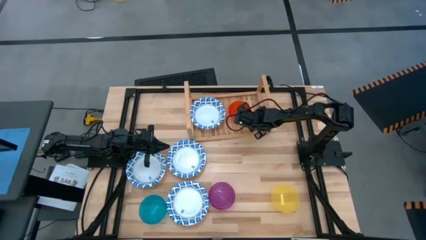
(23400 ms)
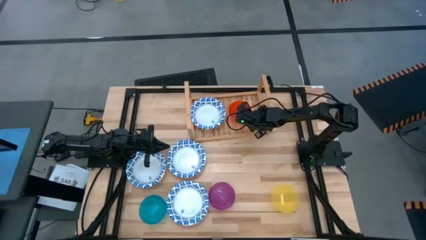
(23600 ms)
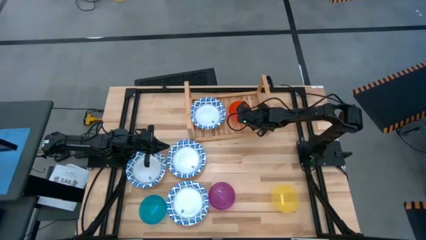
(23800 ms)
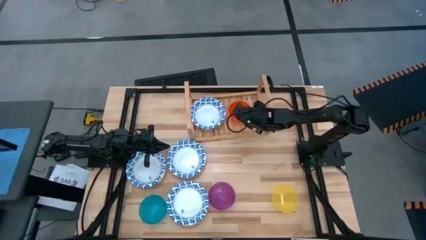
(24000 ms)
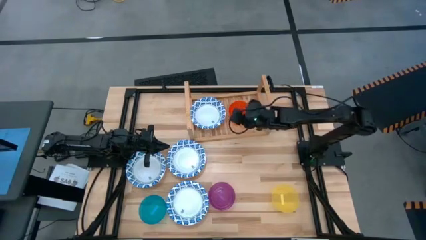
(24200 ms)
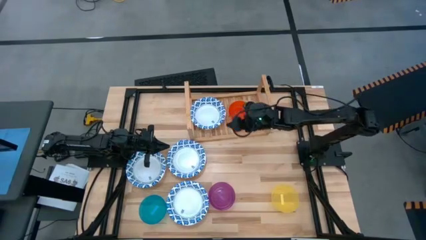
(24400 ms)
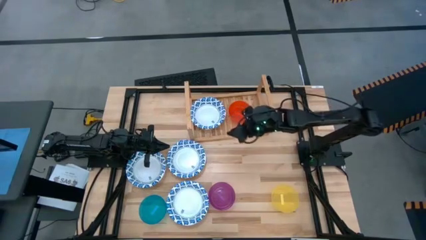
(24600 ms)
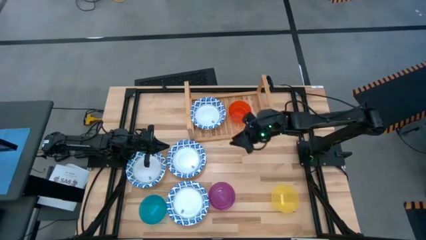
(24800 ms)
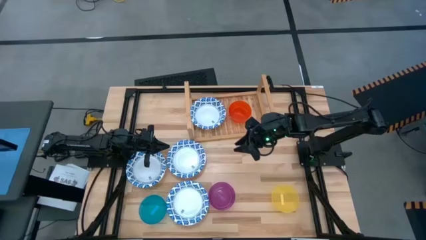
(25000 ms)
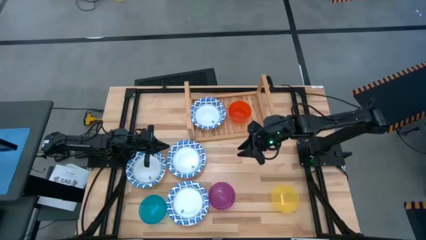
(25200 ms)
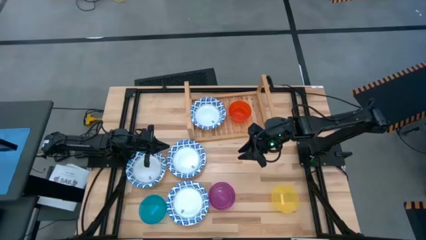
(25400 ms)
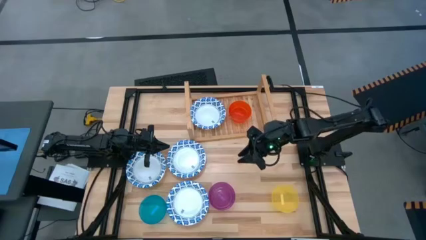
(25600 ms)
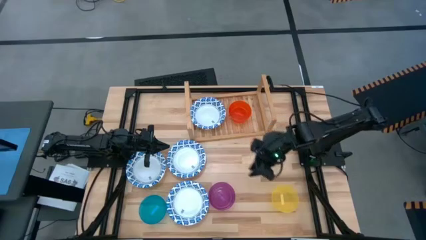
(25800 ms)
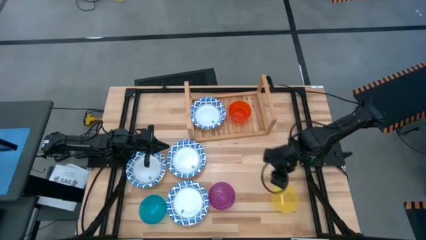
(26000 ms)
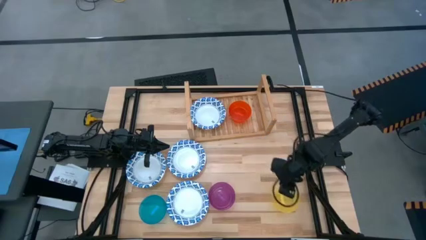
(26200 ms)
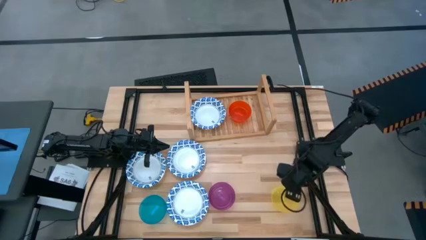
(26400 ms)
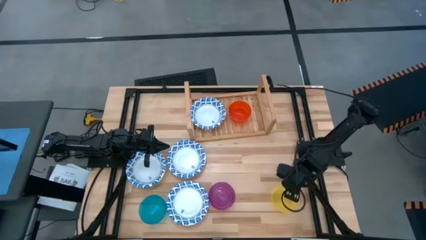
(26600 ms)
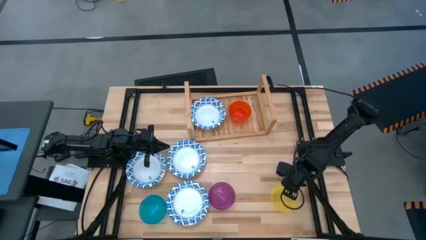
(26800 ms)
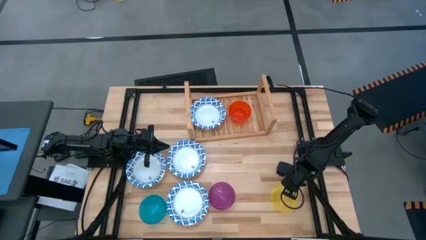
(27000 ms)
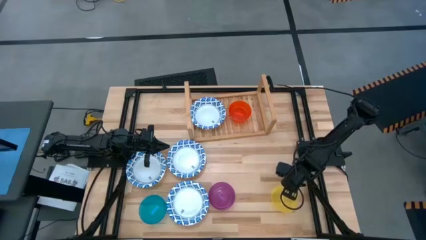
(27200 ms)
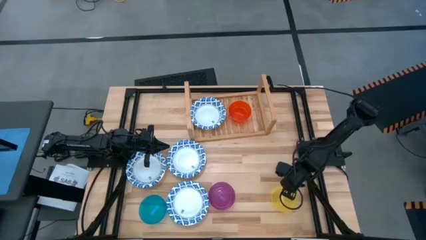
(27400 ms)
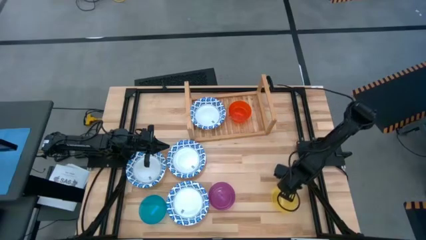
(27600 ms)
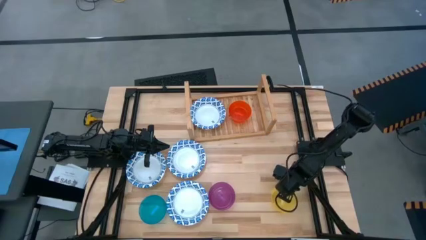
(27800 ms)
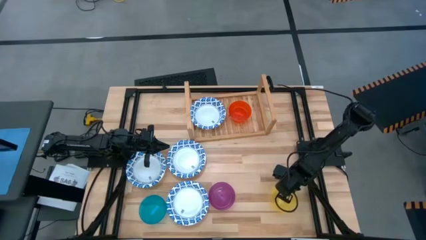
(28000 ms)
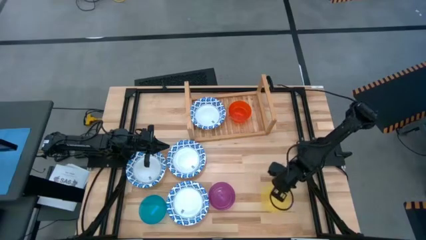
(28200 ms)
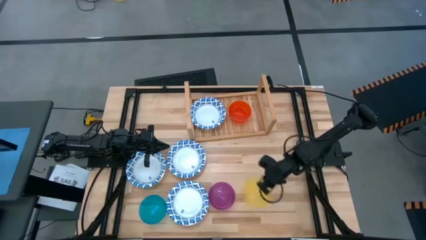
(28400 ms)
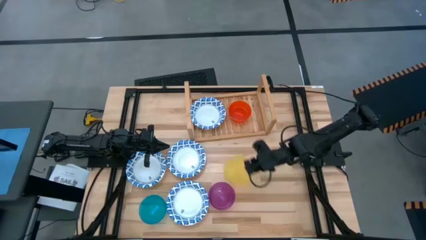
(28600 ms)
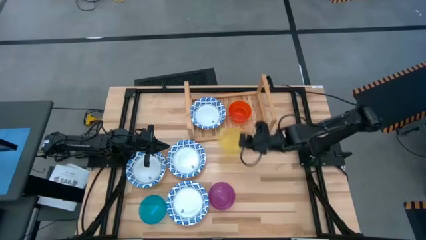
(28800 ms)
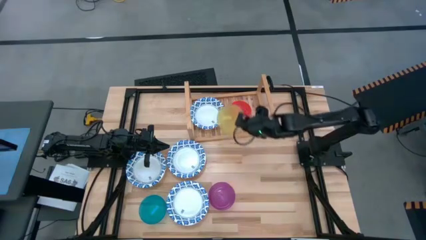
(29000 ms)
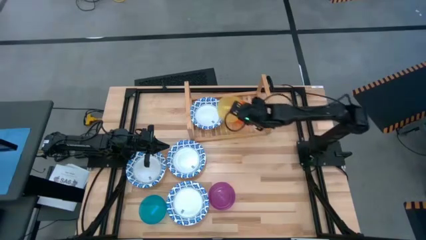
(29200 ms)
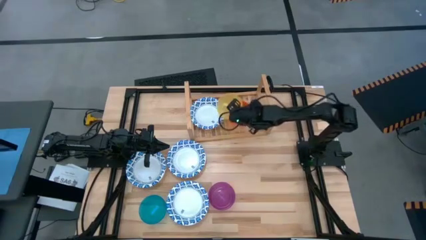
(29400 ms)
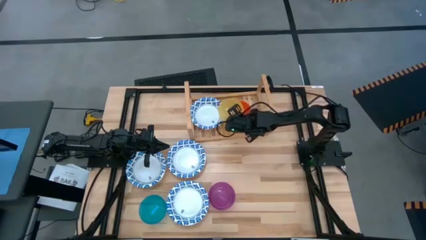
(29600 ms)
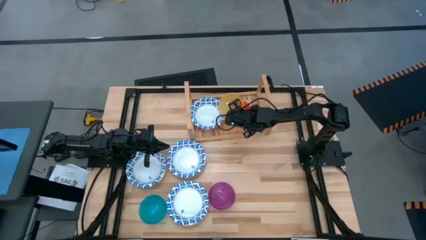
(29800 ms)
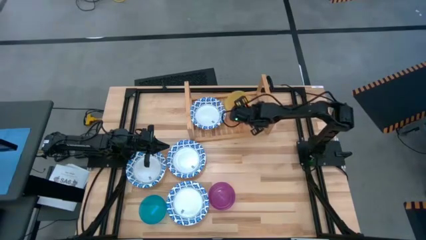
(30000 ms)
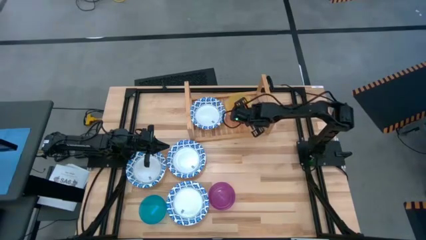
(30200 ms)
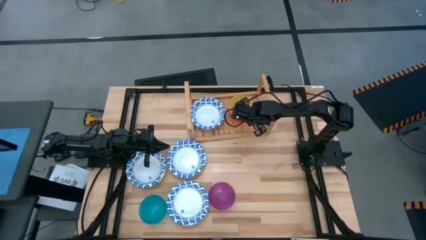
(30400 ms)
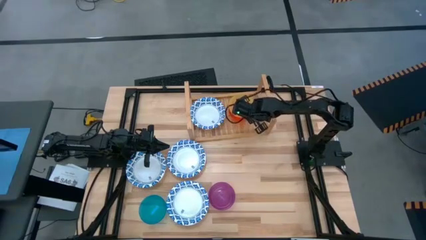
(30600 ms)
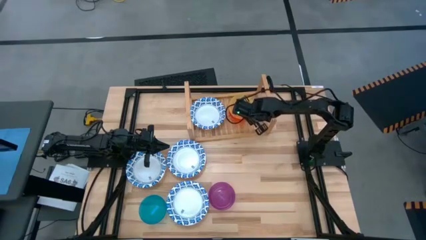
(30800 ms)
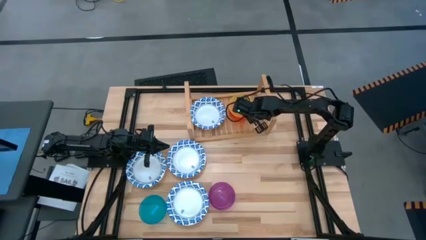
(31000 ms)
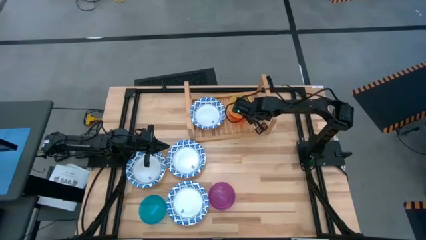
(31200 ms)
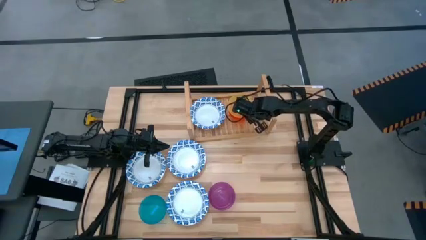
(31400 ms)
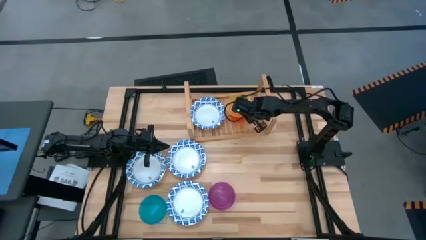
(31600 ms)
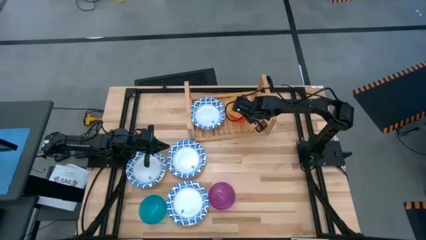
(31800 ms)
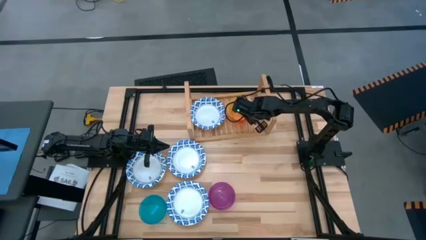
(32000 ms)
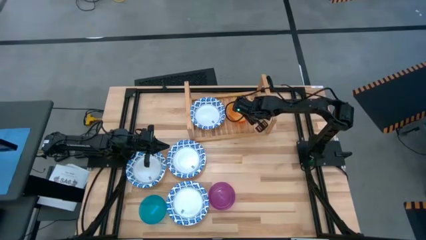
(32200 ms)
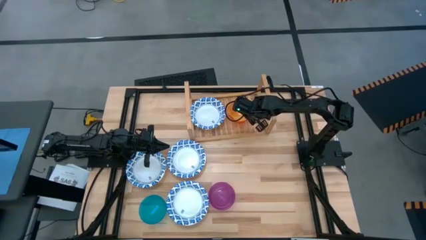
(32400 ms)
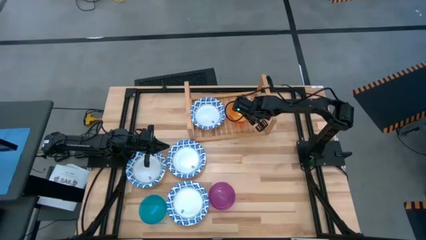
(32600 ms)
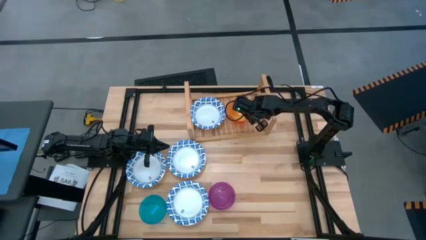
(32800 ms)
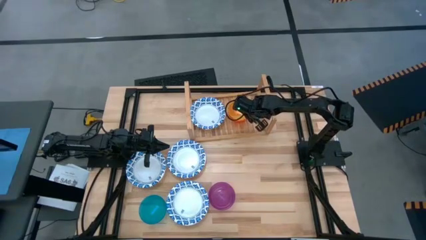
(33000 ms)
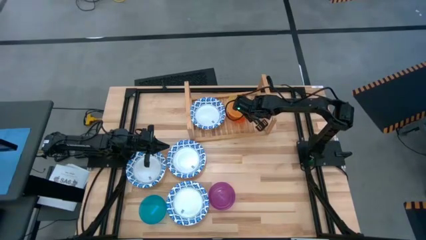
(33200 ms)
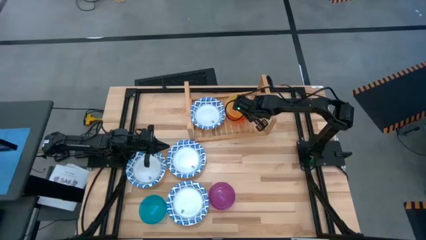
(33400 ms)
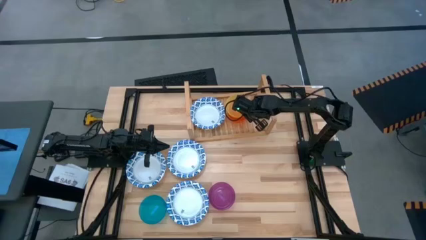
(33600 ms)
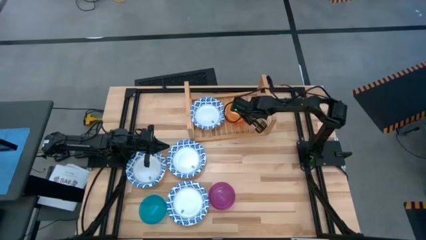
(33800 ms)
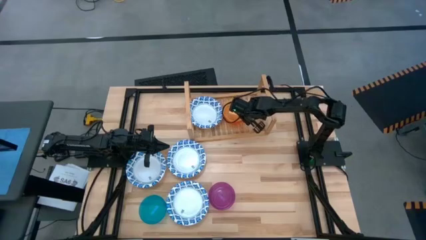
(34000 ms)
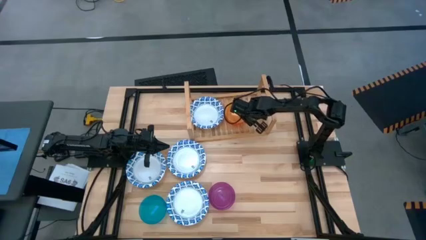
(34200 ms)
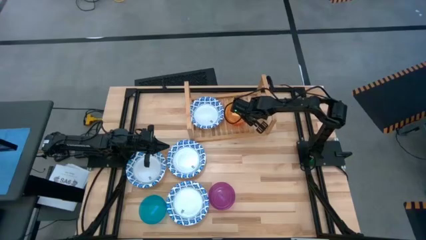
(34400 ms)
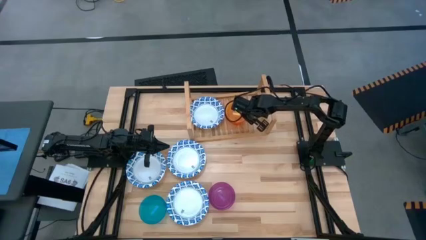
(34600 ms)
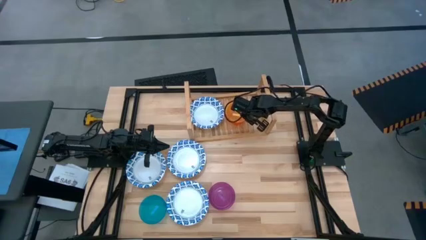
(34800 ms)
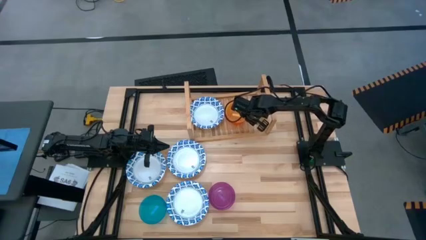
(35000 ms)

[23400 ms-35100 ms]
Task: Place and stack bowls onto a shelf
Stack the yellow transparent bowl on top of the orange transparent bowl on the shelf

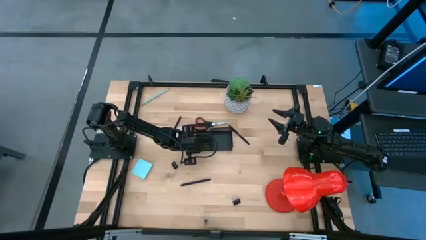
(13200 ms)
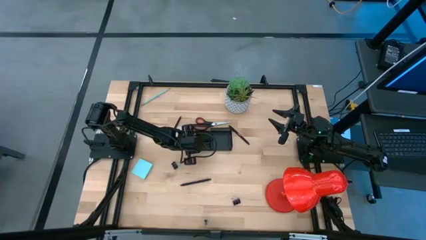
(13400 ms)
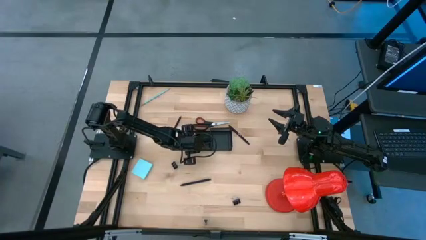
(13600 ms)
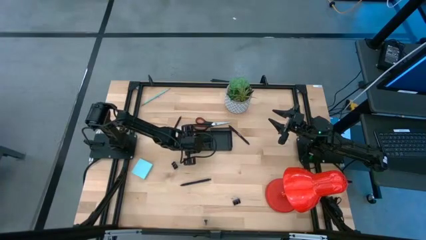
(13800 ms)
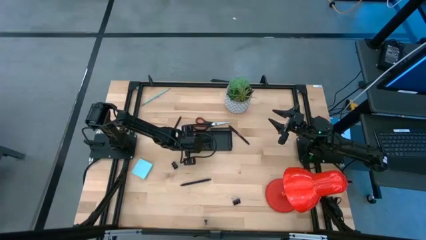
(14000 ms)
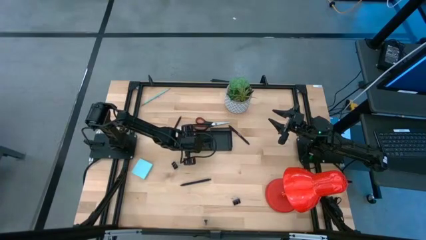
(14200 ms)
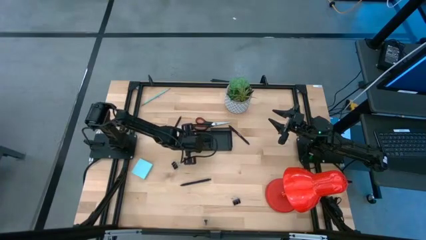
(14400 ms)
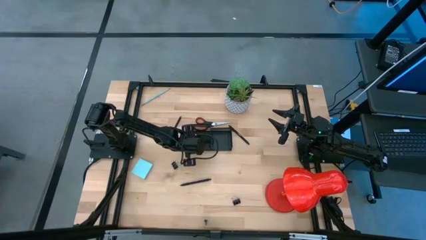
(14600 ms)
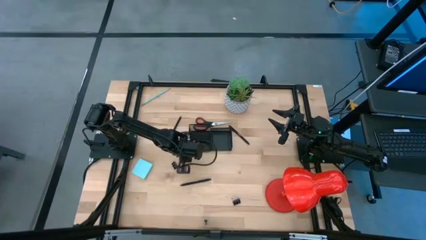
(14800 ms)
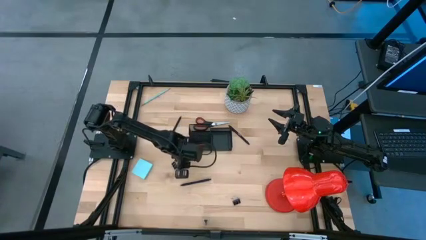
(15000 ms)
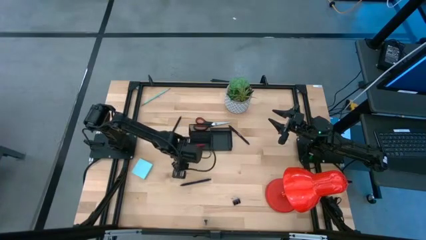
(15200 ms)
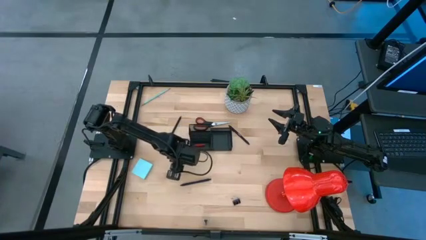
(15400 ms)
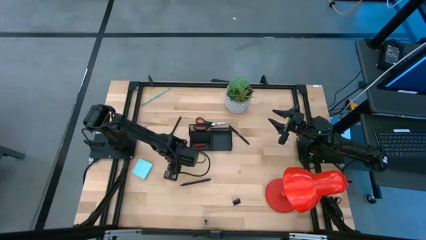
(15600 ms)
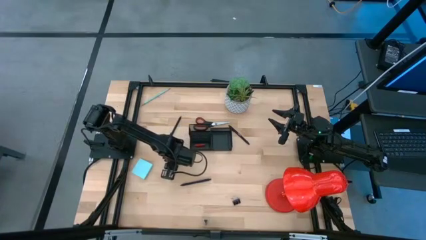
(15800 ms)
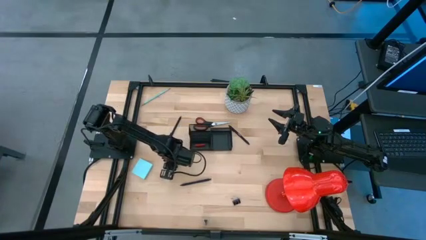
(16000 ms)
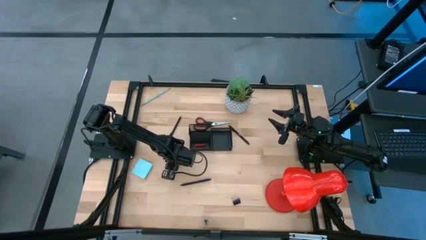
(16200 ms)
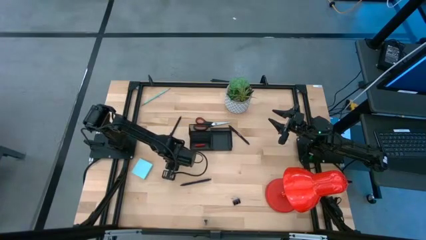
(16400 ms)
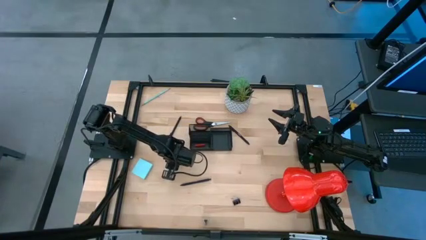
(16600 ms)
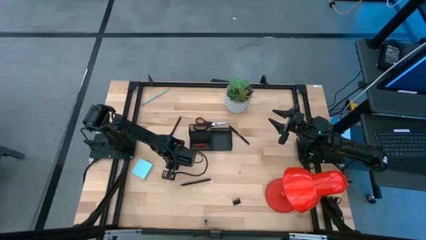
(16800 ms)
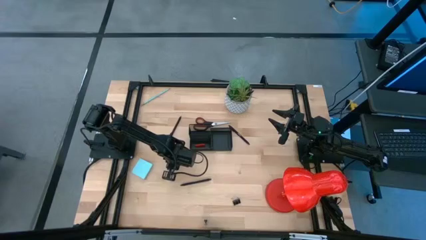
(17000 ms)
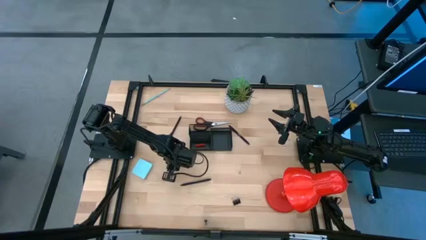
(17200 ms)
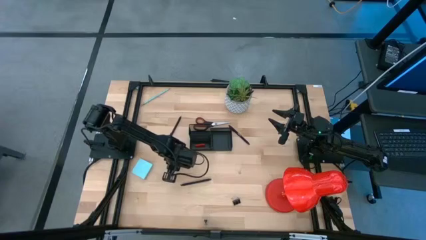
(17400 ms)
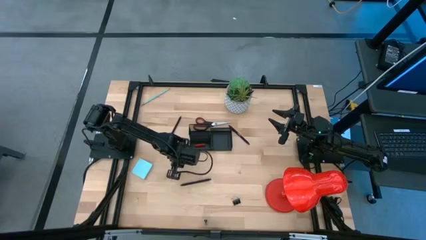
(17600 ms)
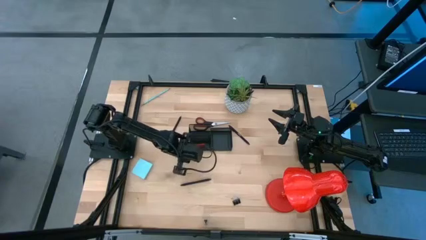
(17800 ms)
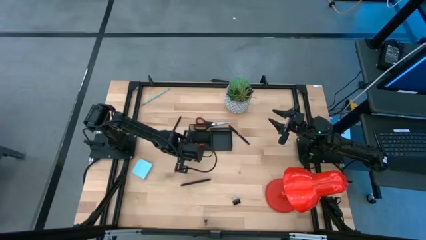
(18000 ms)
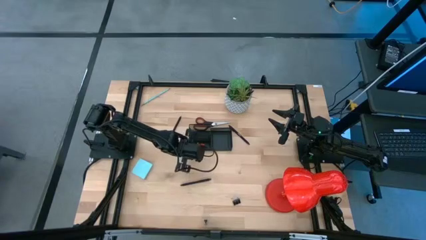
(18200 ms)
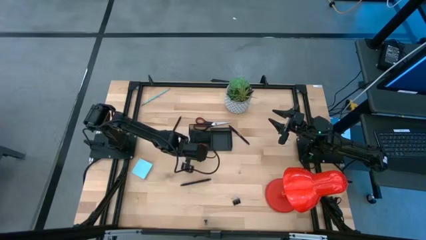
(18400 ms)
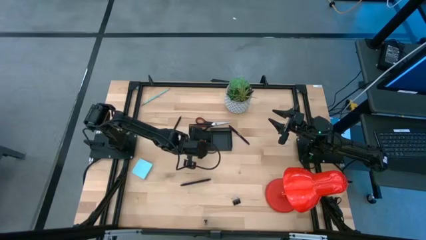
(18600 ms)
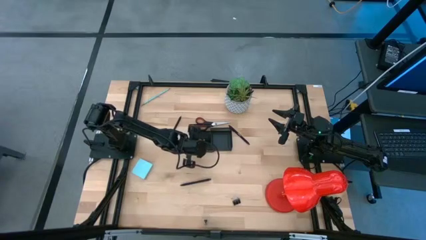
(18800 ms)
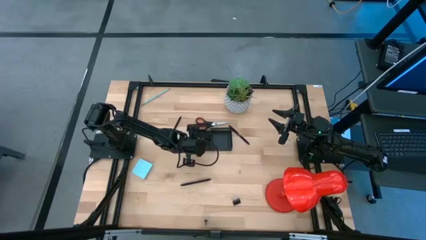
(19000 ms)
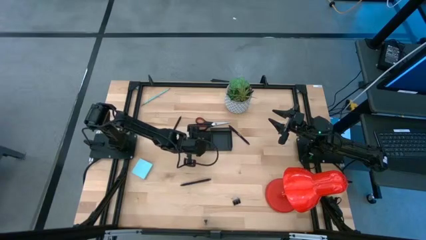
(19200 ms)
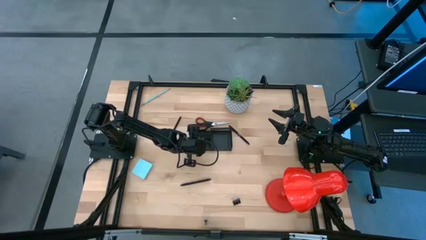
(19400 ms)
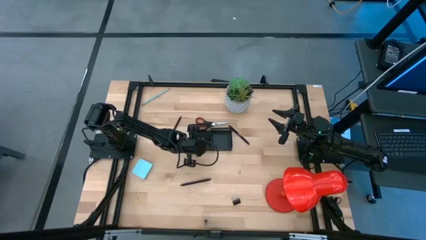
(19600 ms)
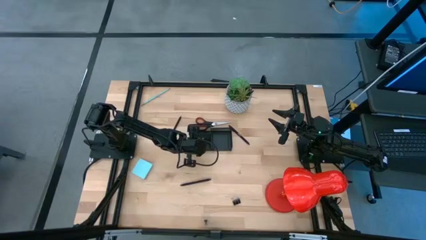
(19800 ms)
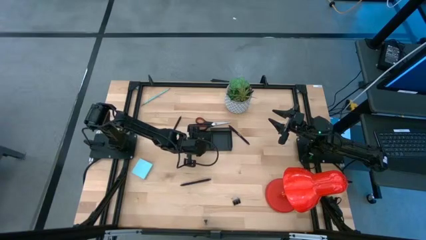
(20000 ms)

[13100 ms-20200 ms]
Task: Pick and place office supplies into organizer
Put the top binder clip into the bottom left section of the desk organizer
